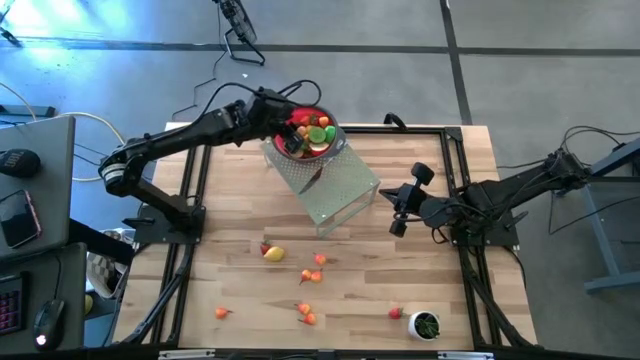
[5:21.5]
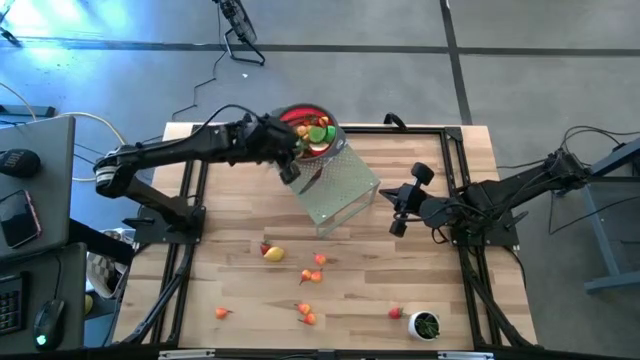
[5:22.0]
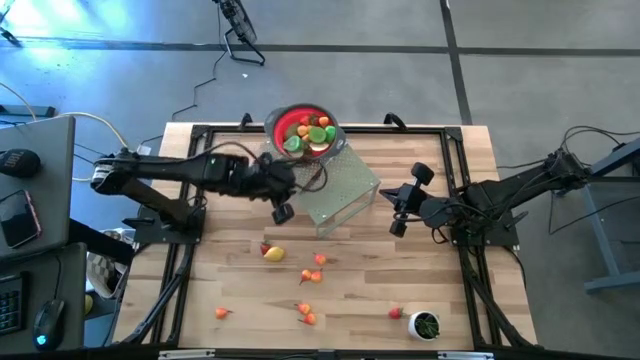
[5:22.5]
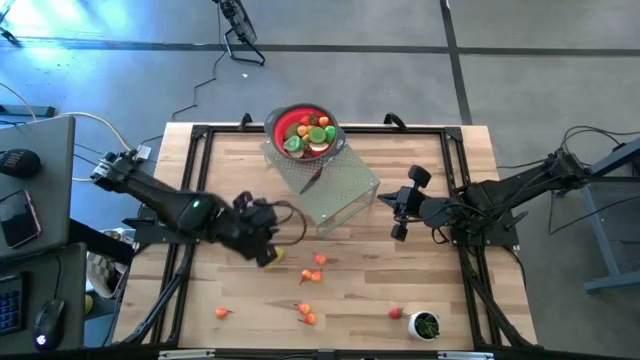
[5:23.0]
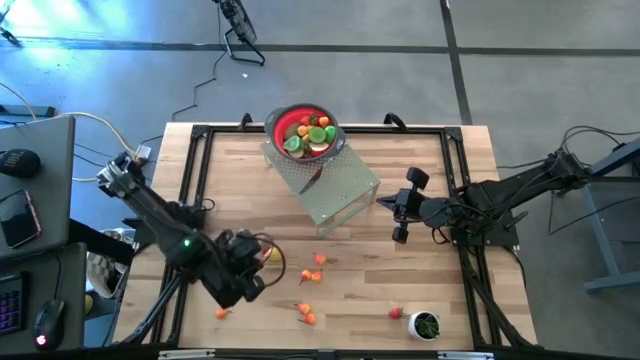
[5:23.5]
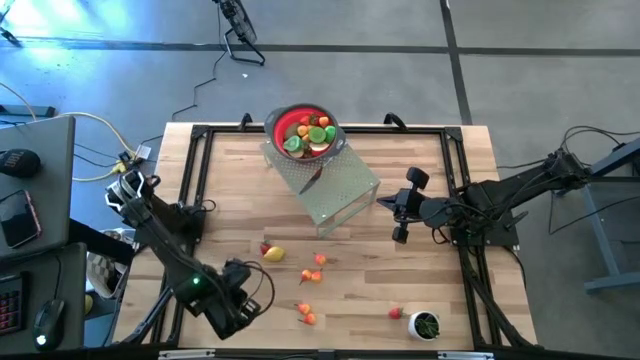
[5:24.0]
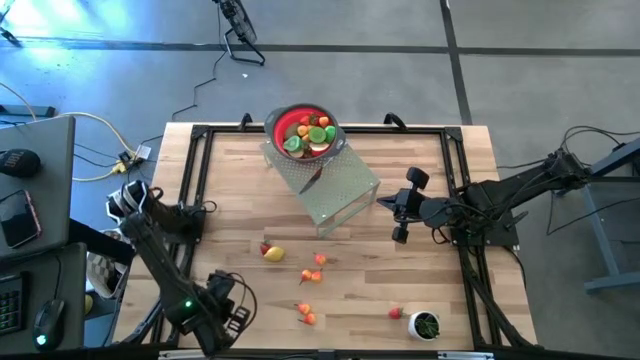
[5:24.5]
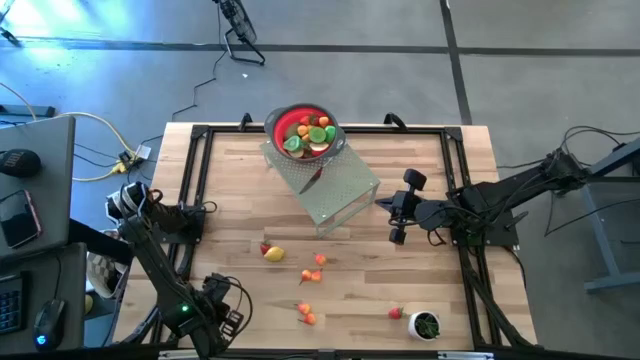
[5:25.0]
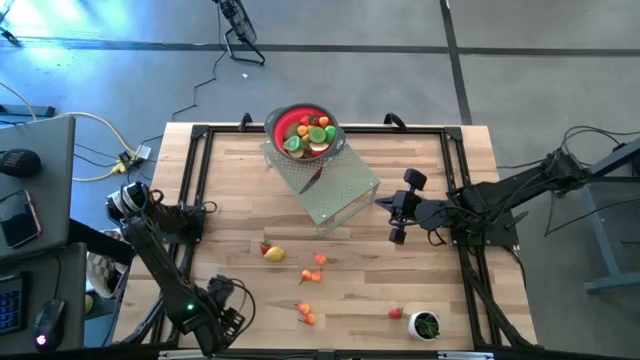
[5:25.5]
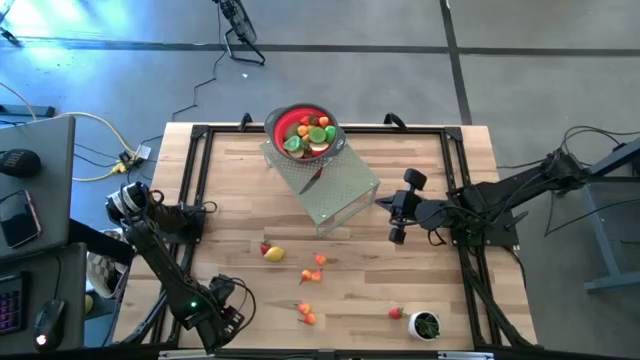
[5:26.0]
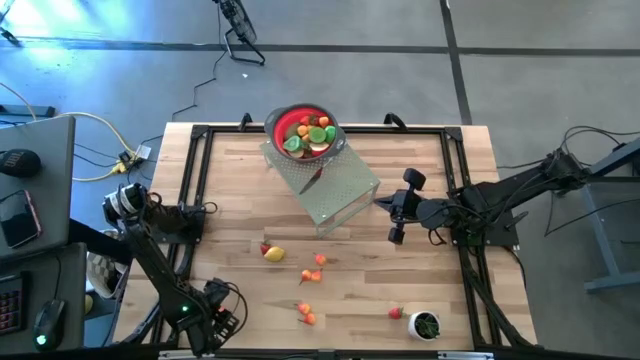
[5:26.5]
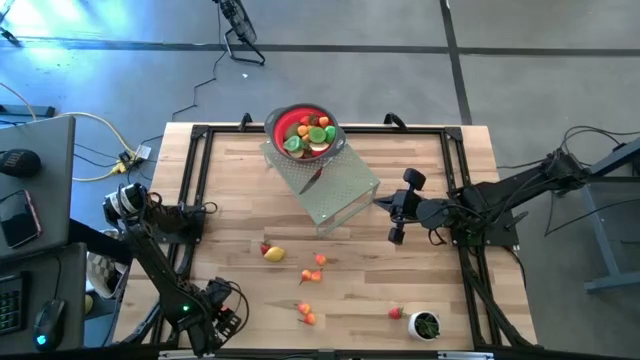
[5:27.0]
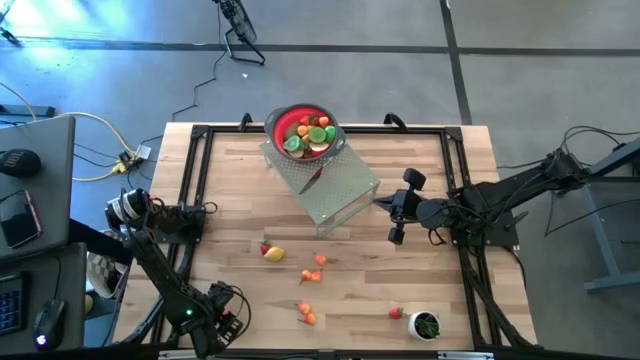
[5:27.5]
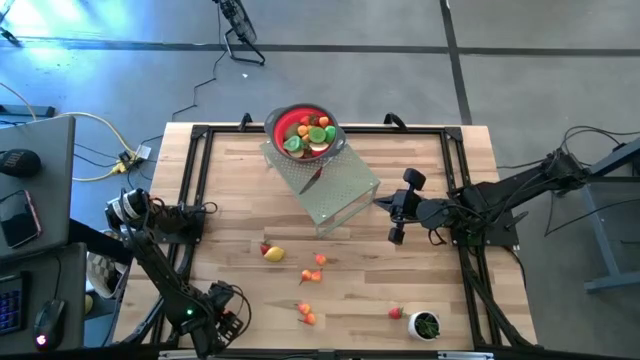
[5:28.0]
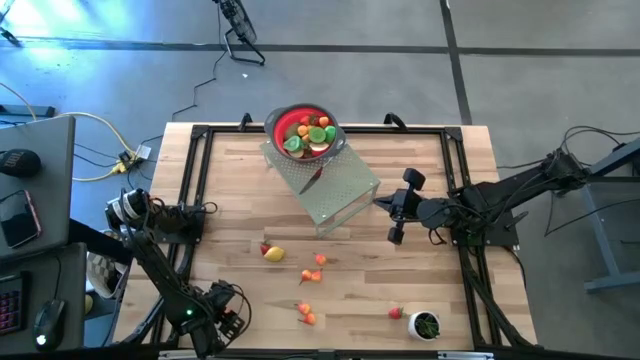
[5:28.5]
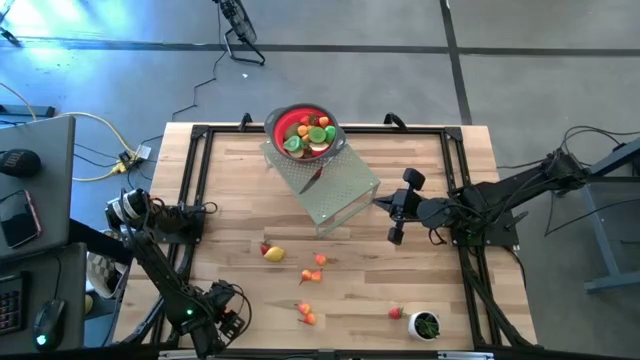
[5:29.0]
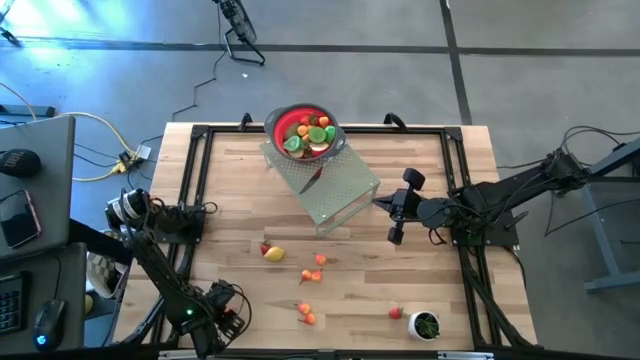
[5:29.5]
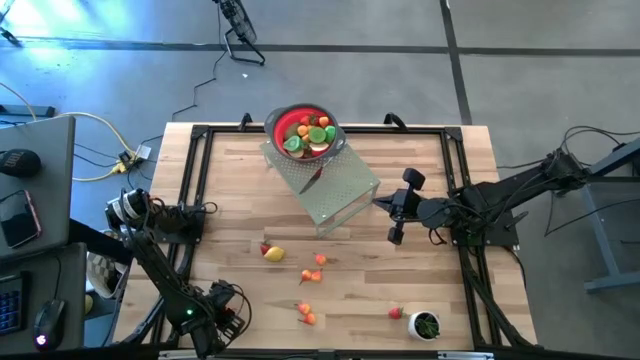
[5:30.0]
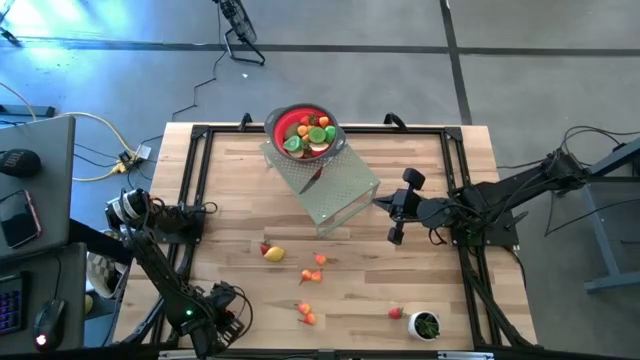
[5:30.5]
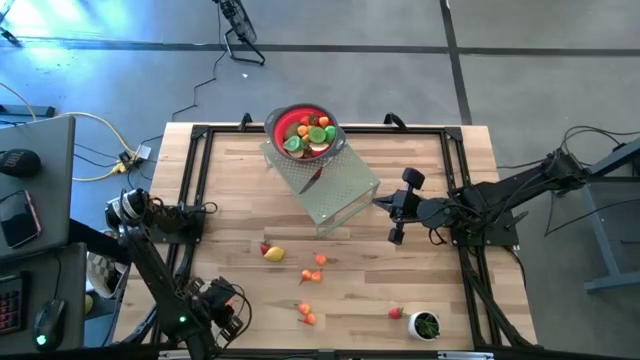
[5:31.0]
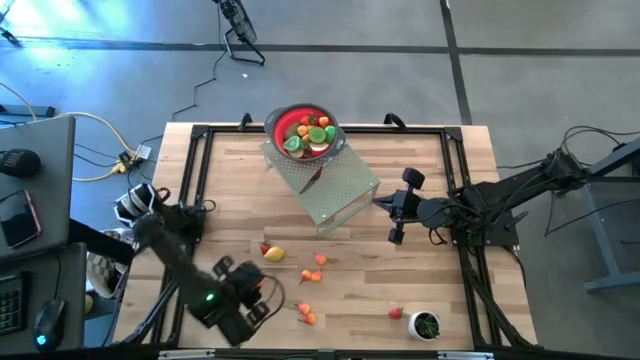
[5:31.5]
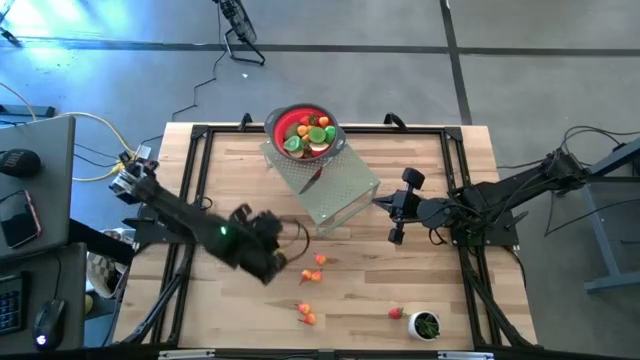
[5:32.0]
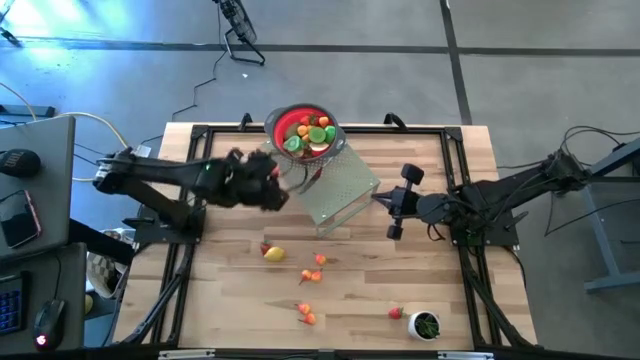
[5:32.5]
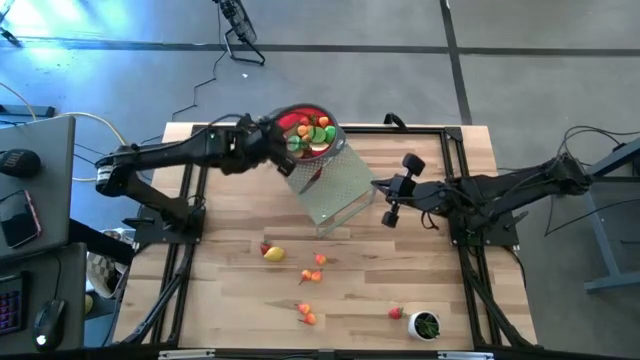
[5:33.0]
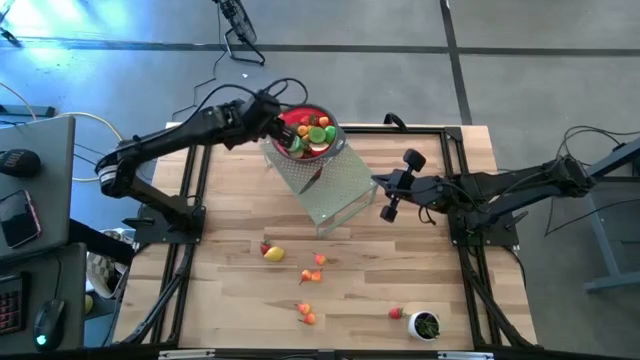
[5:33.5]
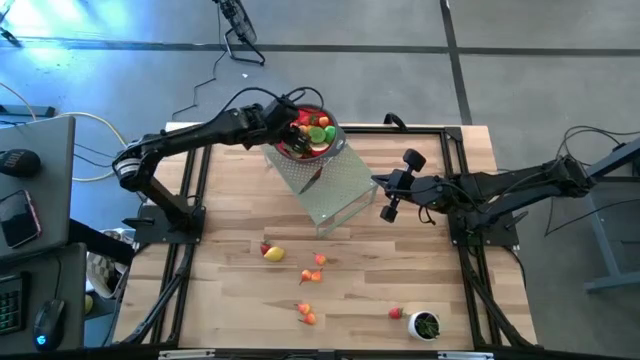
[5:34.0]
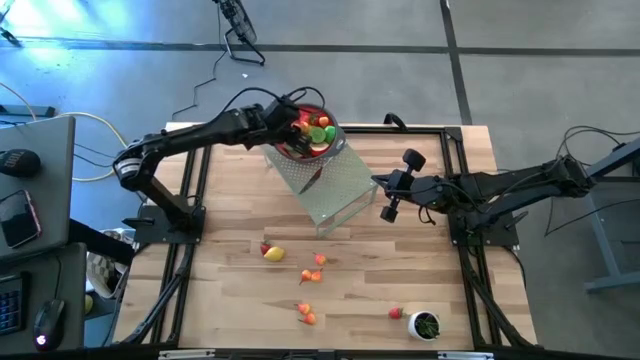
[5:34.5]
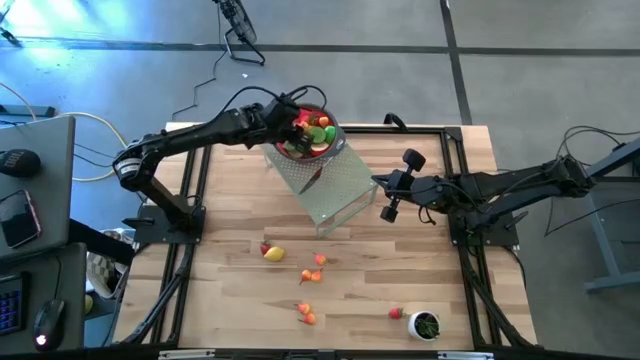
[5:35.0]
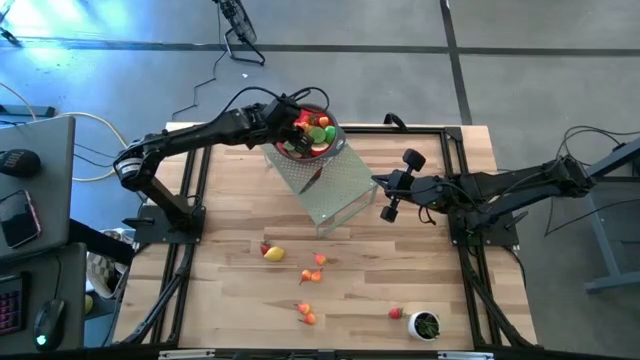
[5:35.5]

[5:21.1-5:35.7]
Task: Pick & Place Fruit
Put the orange pear into the red strainer on the shelf

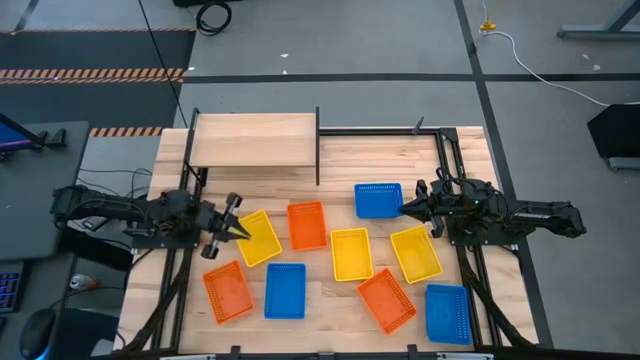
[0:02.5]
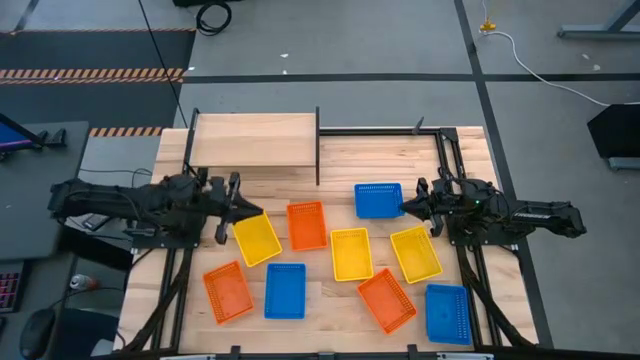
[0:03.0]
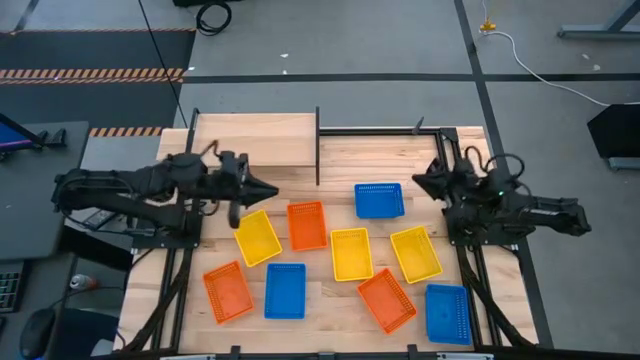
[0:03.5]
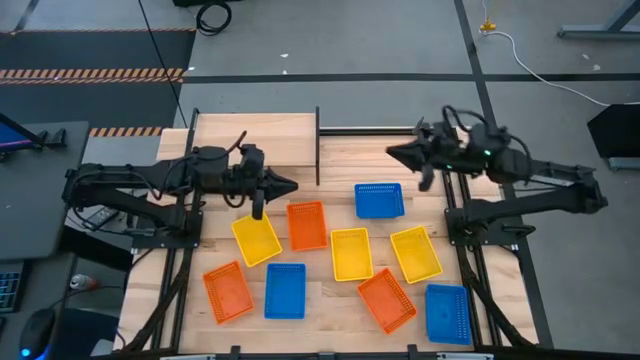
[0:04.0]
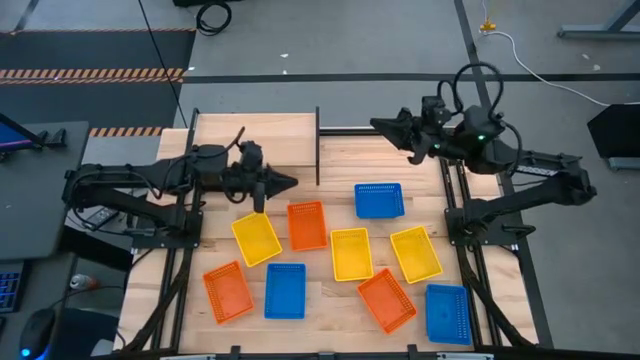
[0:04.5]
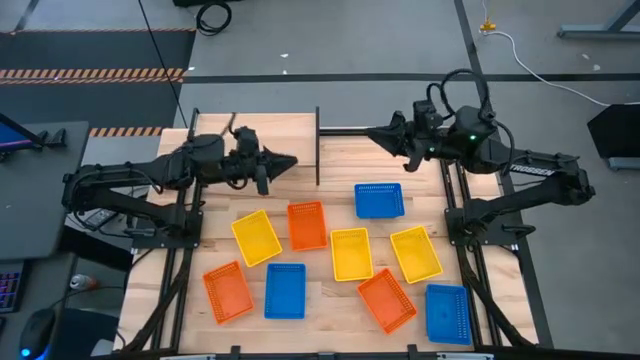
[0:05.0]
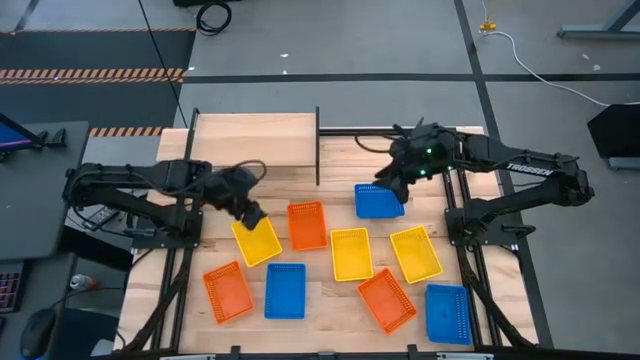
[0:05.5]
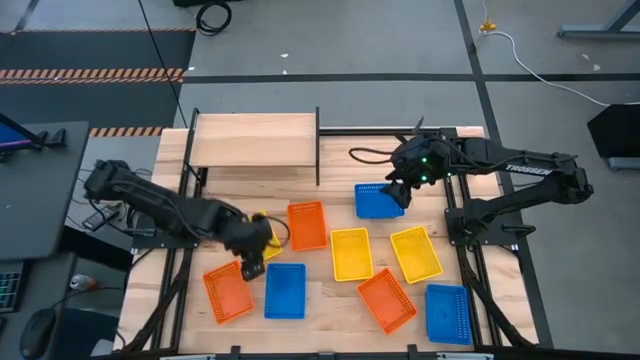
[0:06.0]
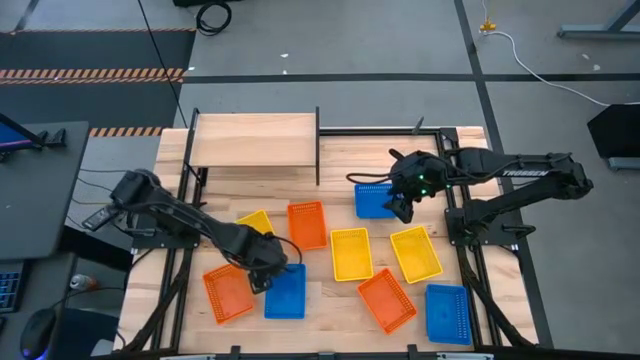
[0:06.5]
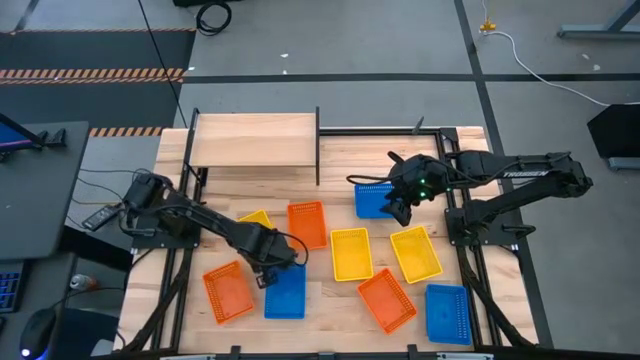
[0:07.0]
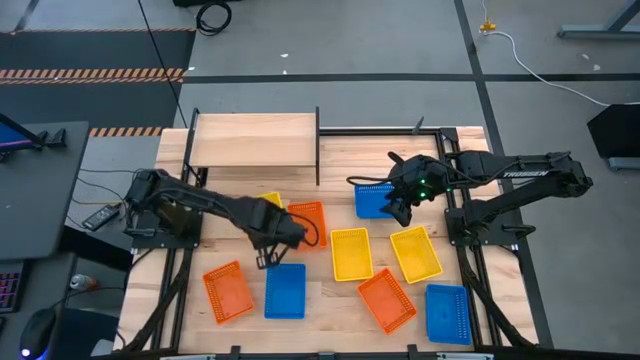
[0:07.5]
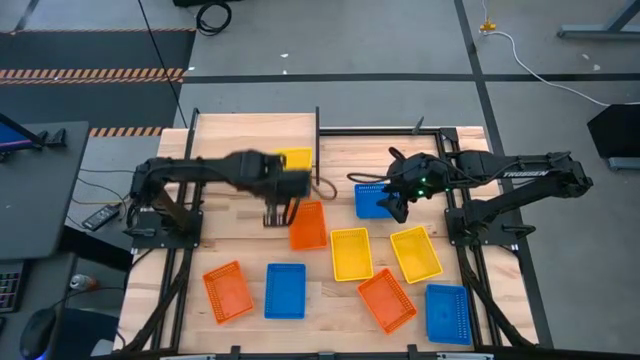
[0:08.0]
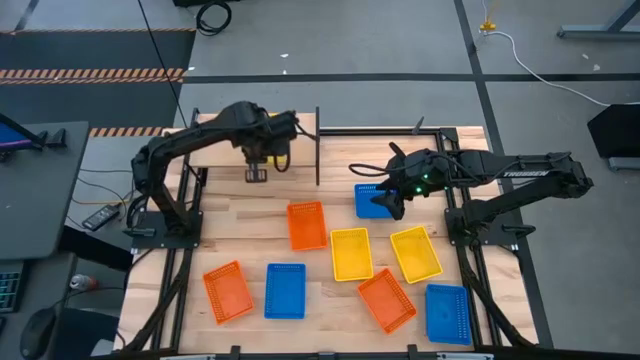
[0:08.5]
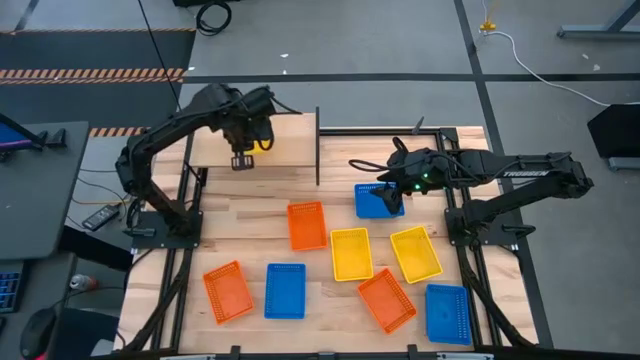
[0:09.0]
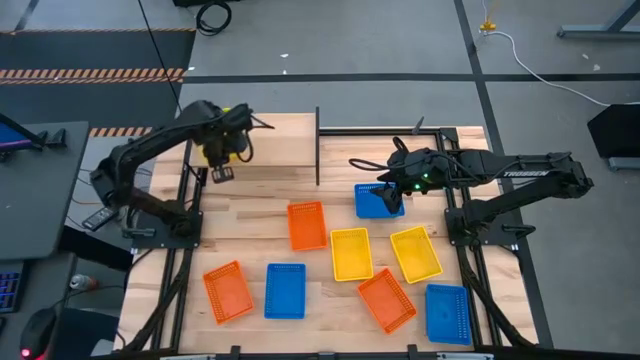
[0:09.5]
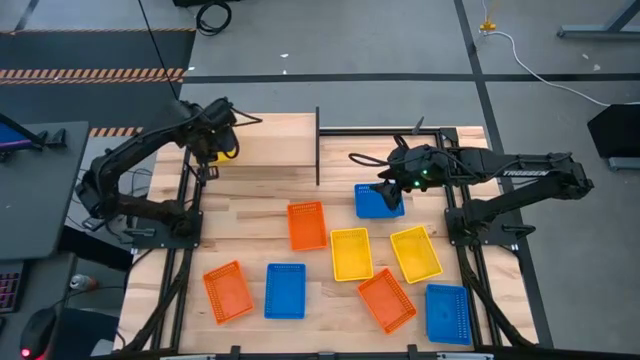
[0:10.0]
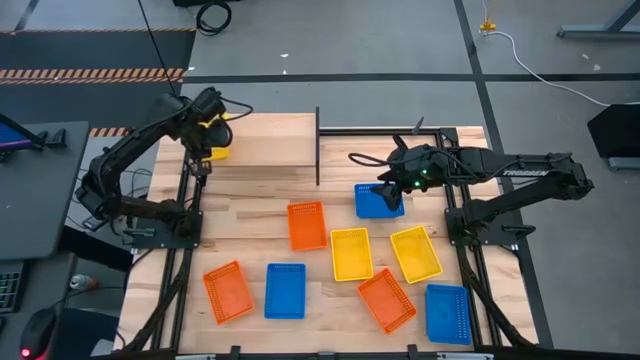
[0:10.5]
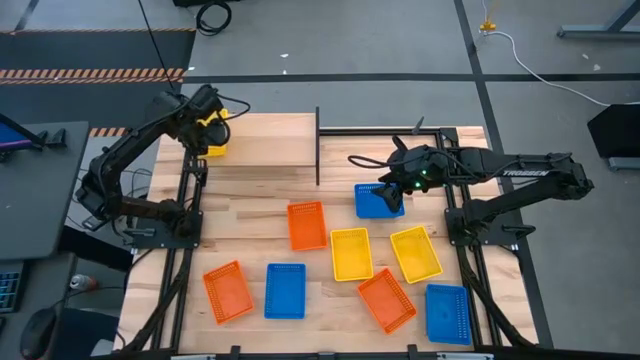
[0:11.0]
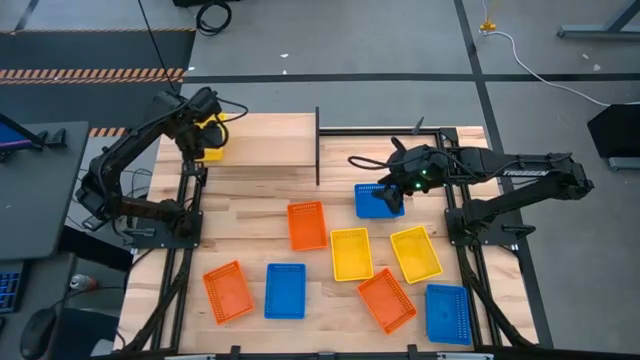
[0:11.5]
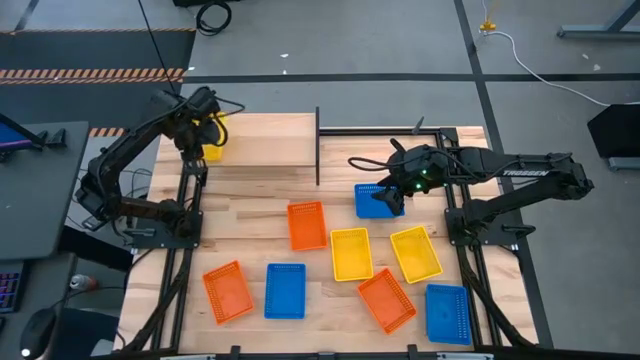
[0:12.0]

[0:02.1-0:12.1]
Task: Stack baskets on shelf by color
Put the left yellow bin on the shelf
